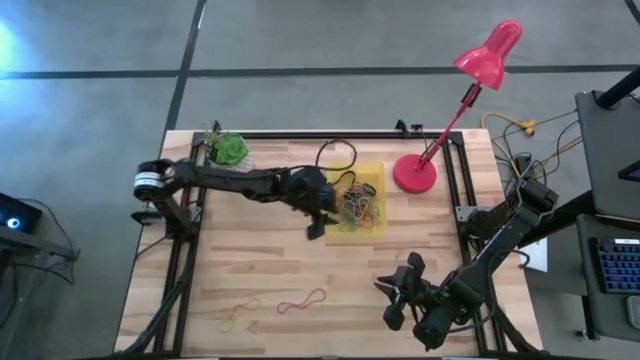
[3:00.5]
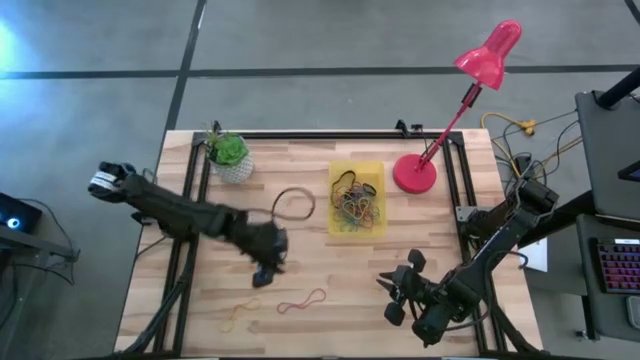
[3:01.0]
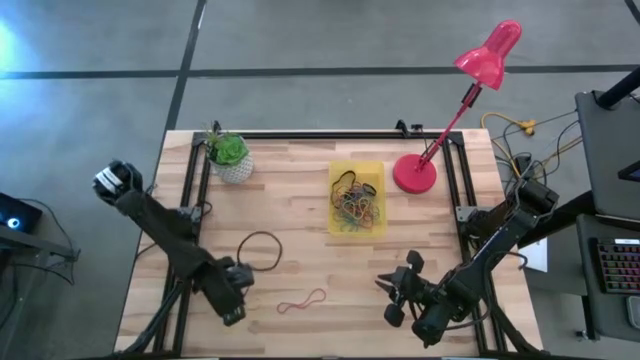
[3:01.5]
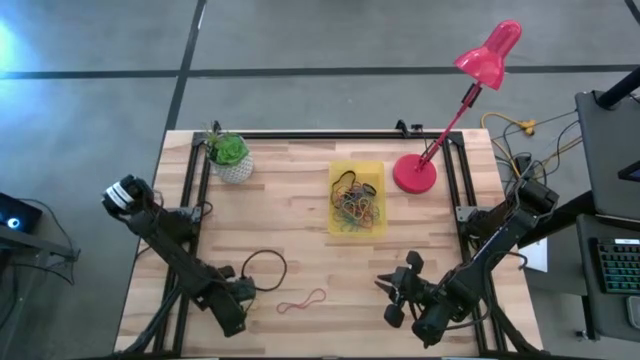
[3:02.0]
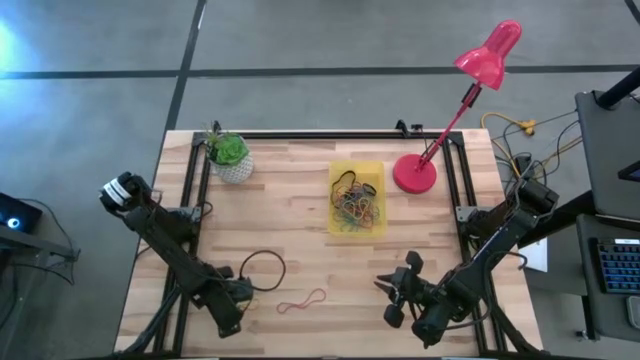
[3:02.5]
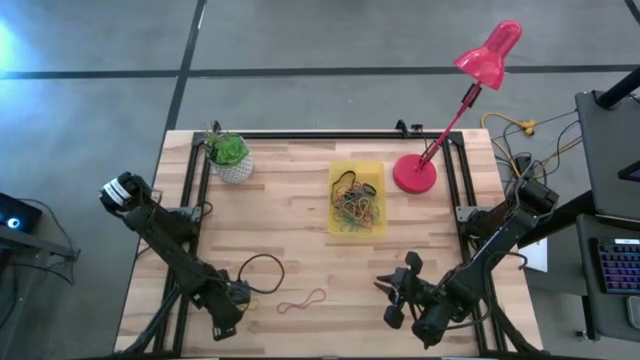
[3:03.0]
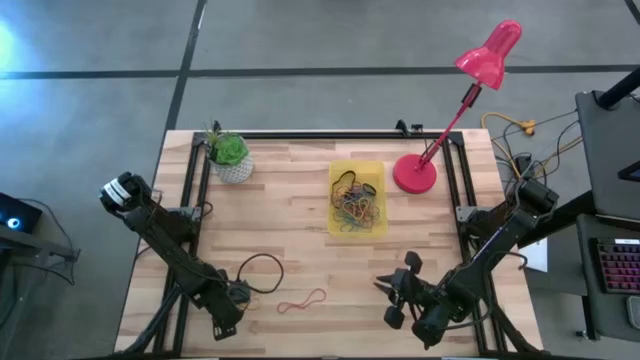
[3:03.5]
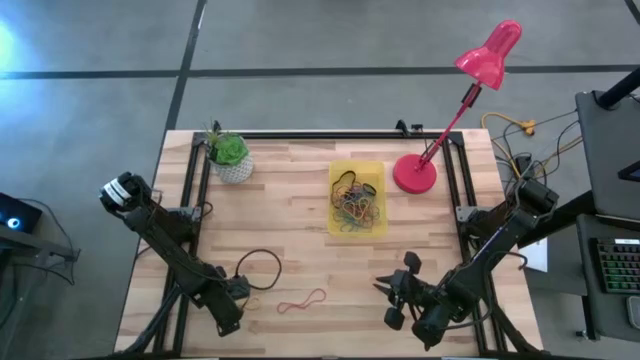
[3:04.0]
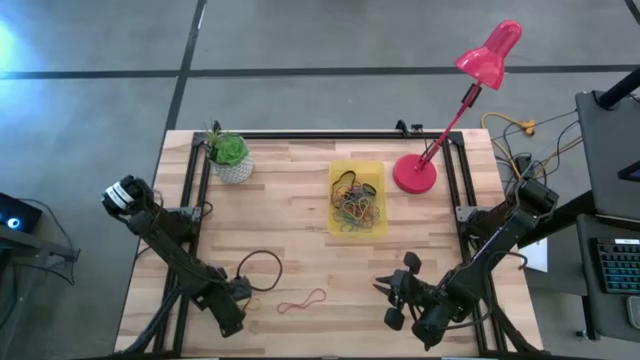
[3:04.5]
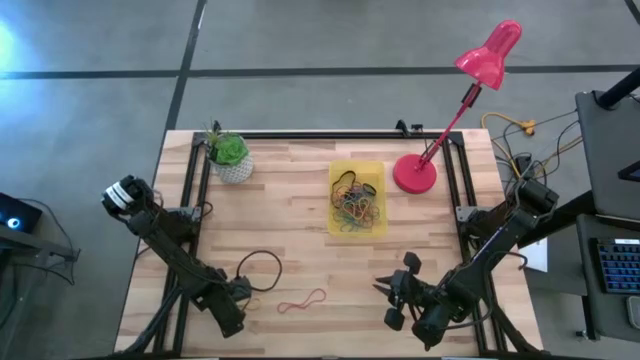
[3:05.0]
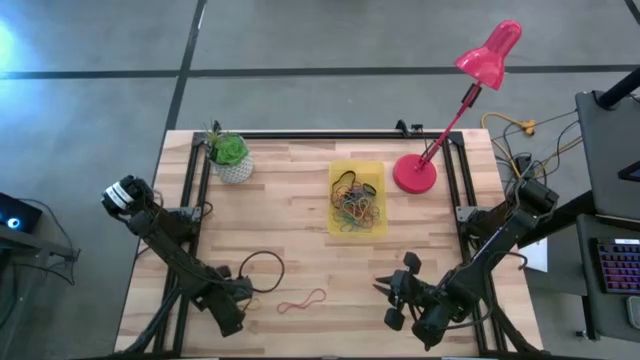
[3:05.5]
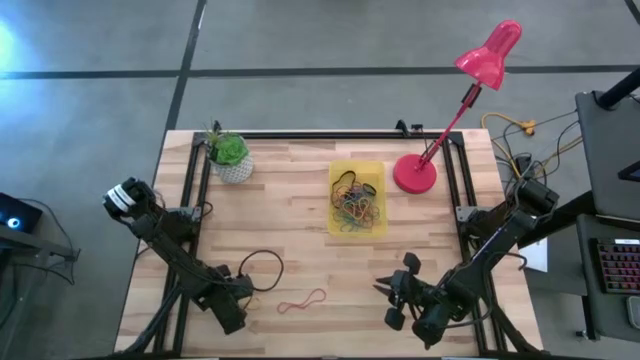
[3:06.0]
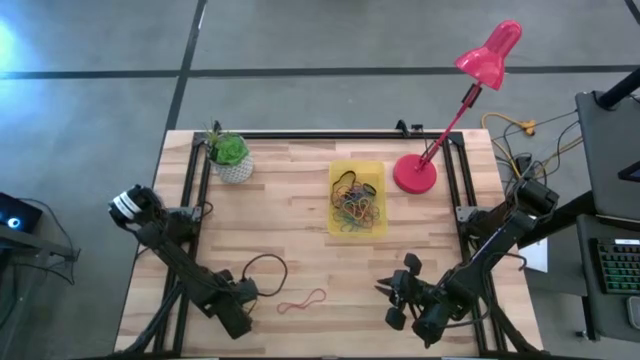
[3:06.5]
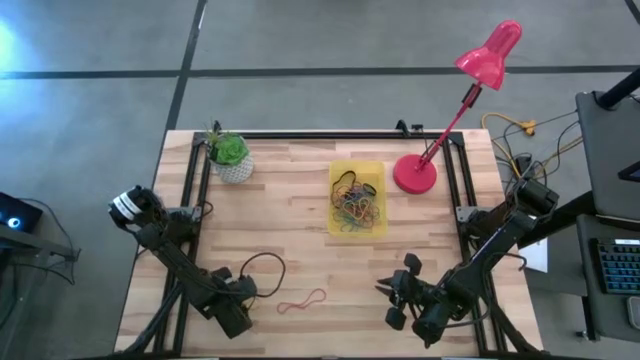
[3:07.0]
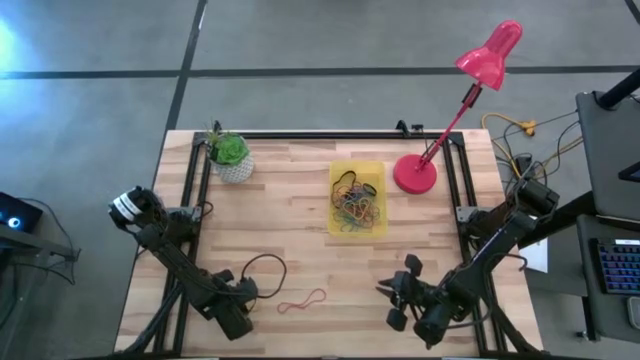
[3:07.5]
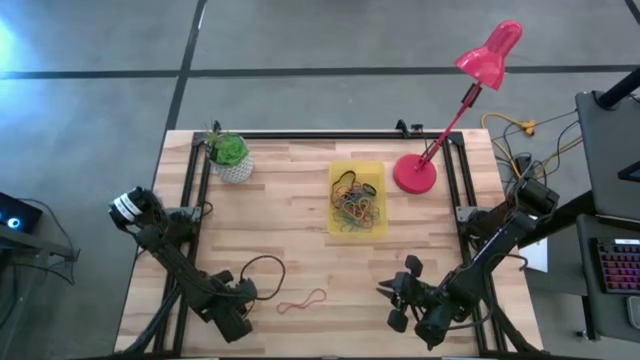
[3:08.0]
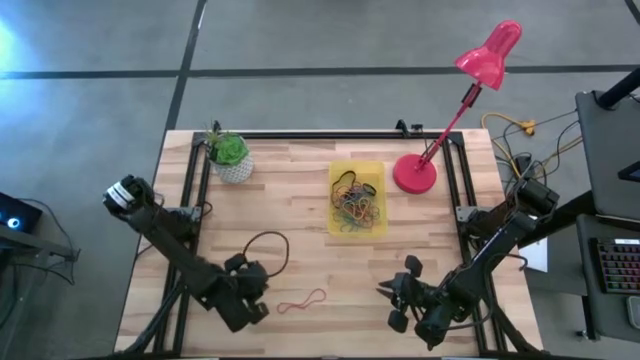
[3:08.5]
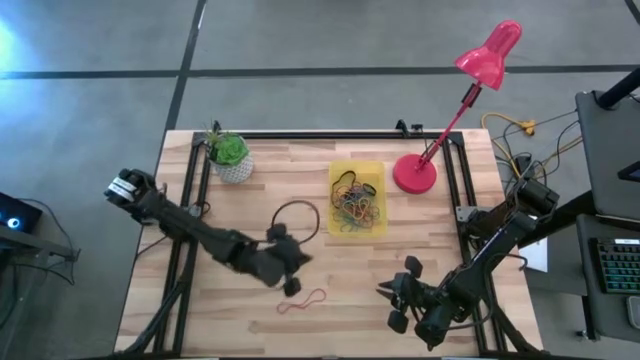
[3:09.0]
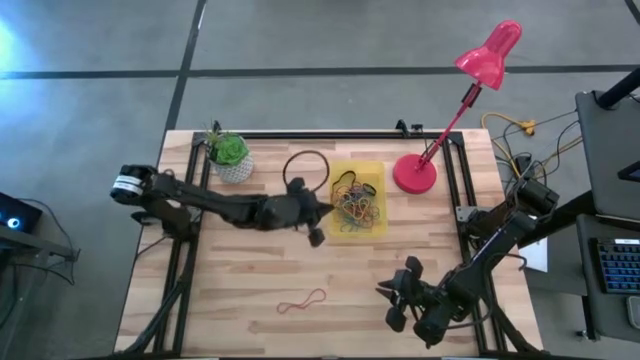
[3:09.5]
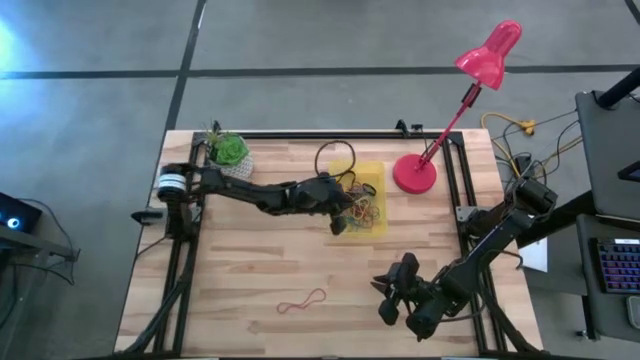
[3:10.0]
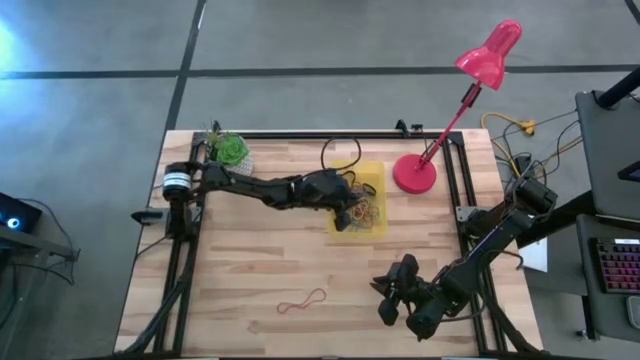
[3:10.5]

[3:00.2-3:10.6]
Task: Pick and place rubber bands into bin
Put the yellow rubber band into the bin

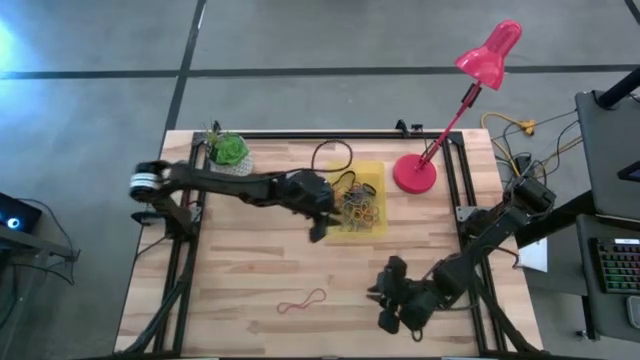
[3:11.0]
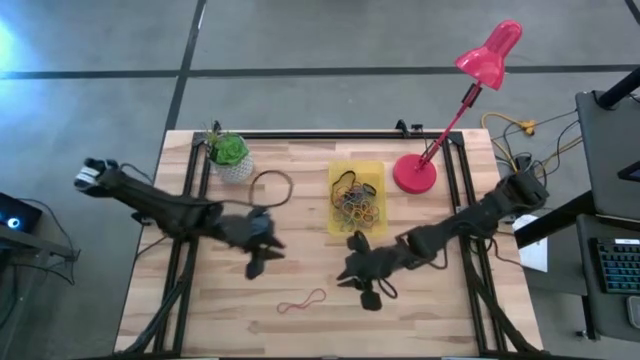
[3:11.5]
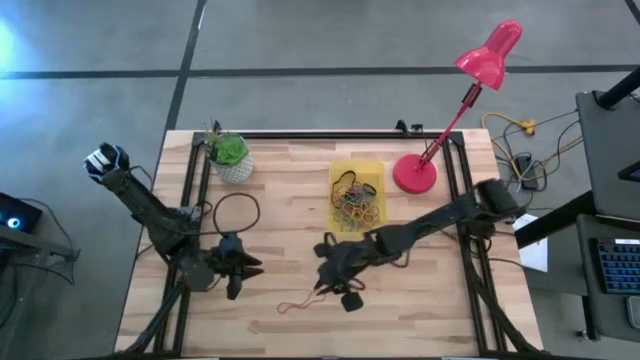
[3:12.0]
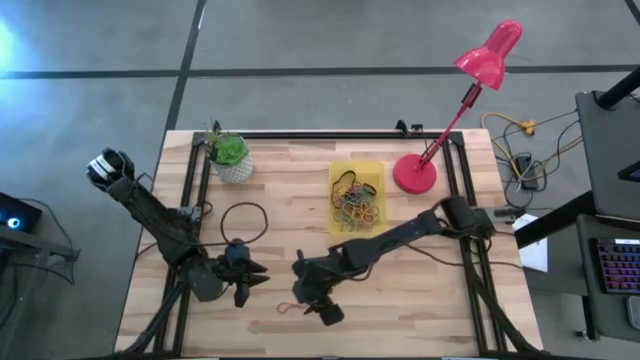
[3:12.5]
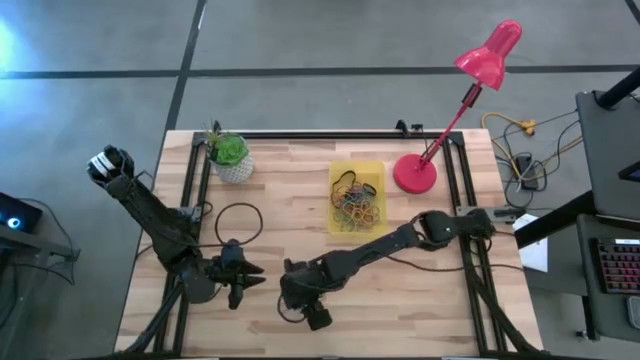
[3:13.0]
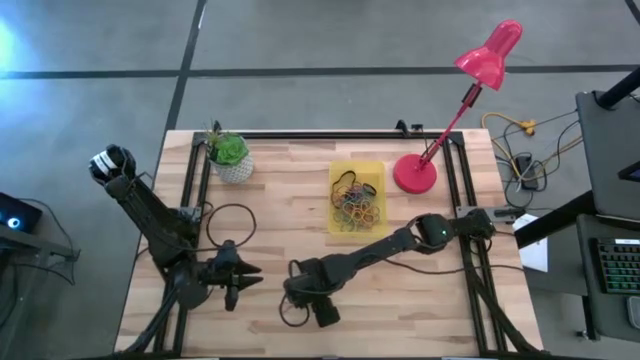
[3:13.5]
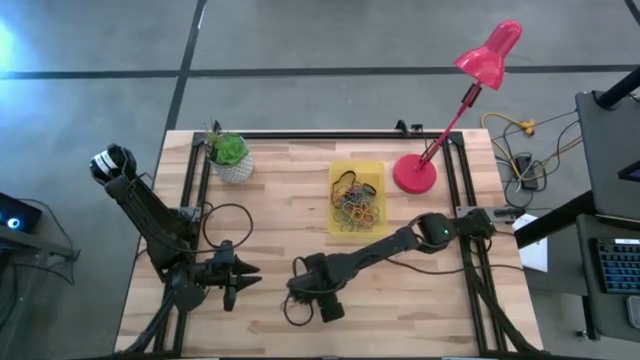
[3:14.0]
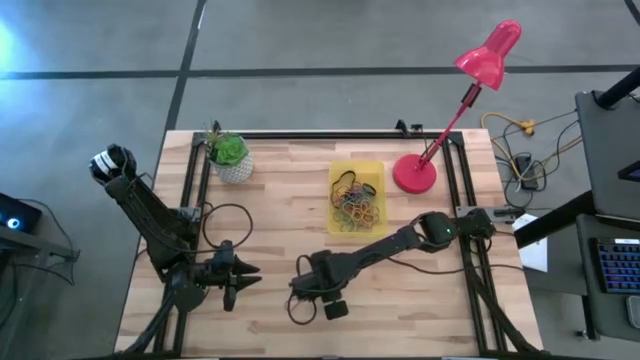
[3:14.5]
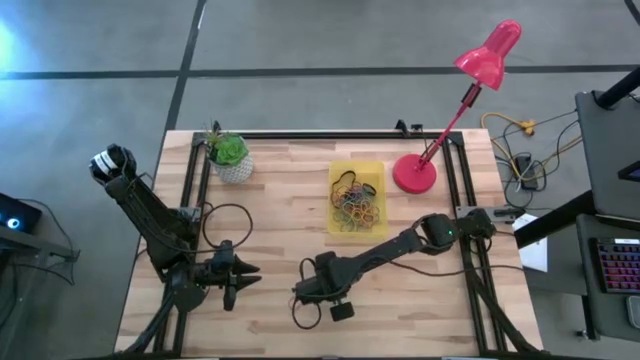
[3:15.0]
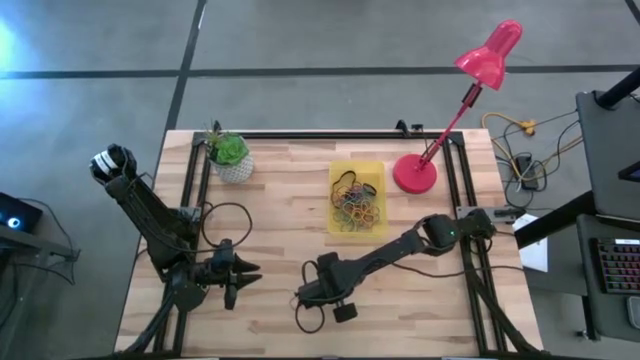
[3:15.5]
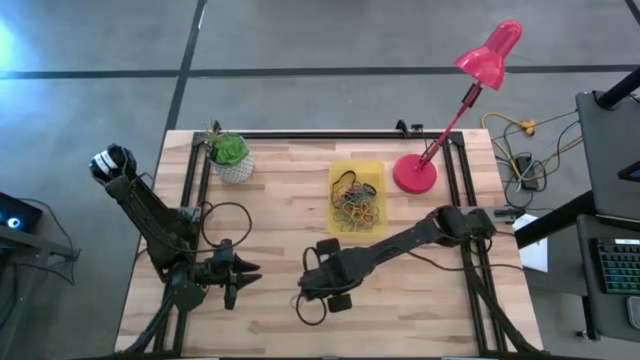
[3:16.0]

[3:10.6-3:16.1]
Put the red rubber band into the bin

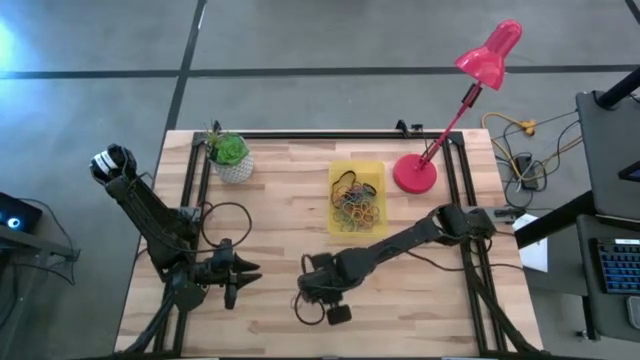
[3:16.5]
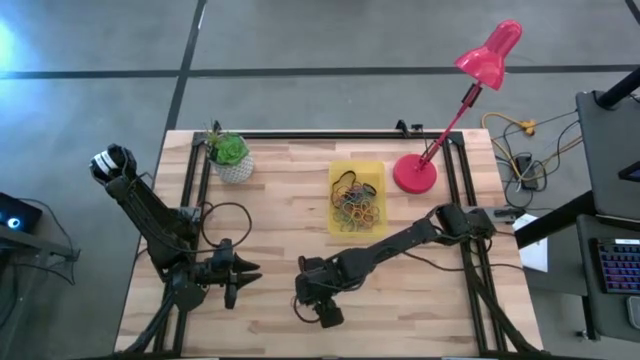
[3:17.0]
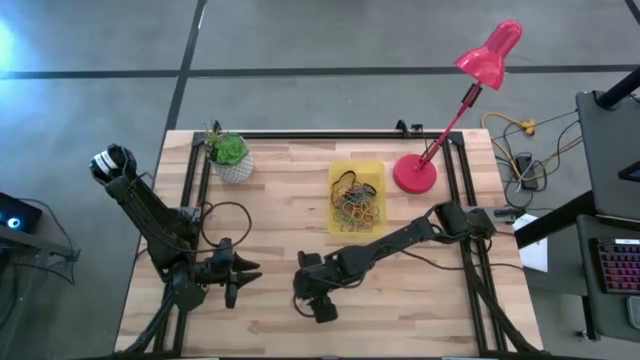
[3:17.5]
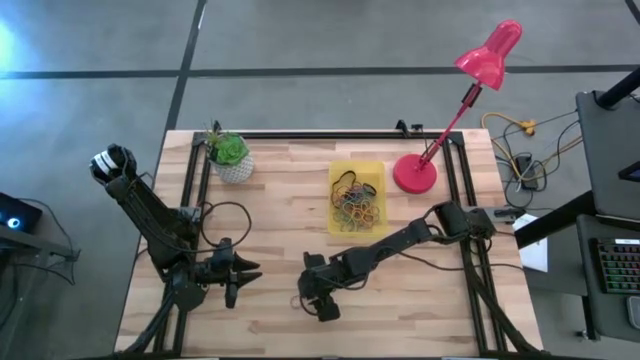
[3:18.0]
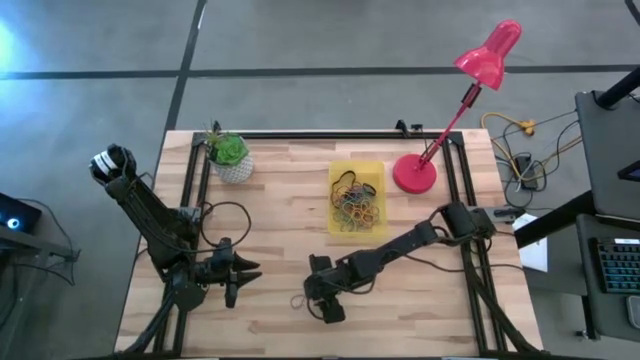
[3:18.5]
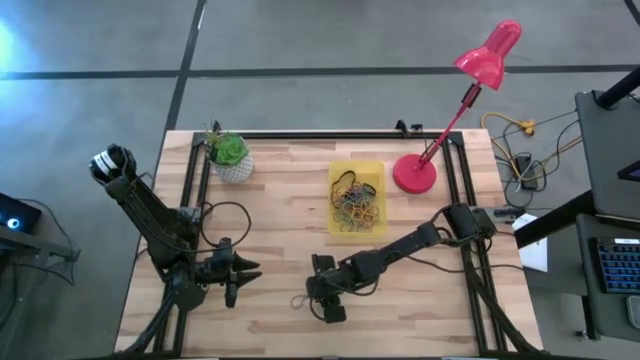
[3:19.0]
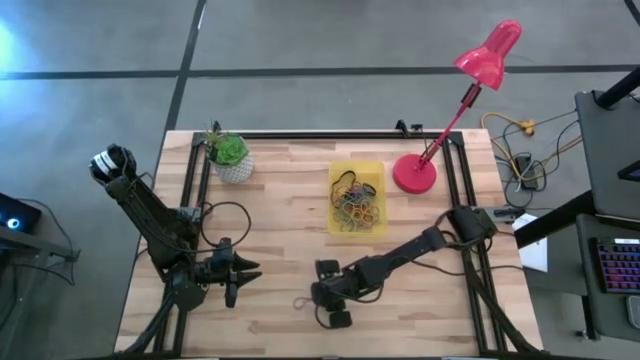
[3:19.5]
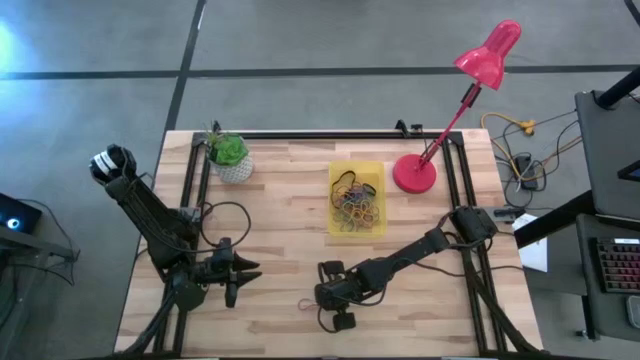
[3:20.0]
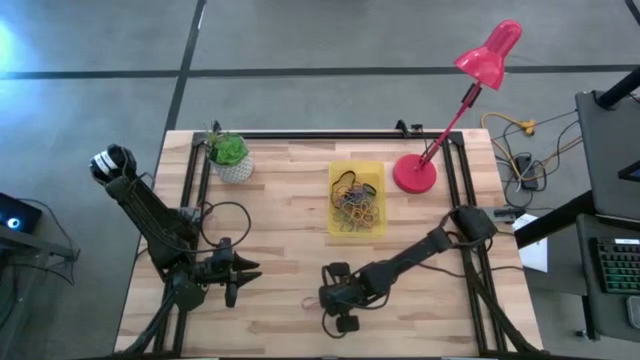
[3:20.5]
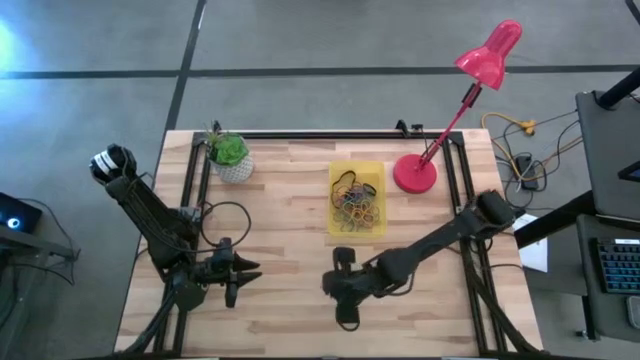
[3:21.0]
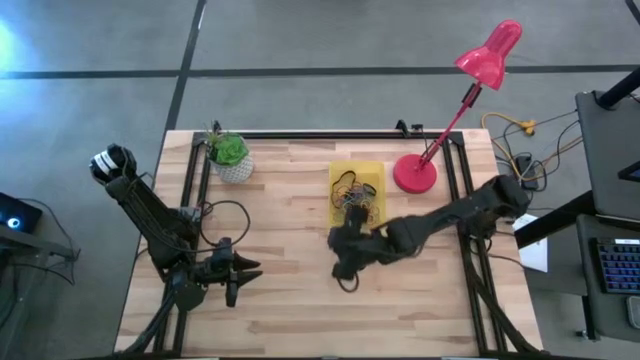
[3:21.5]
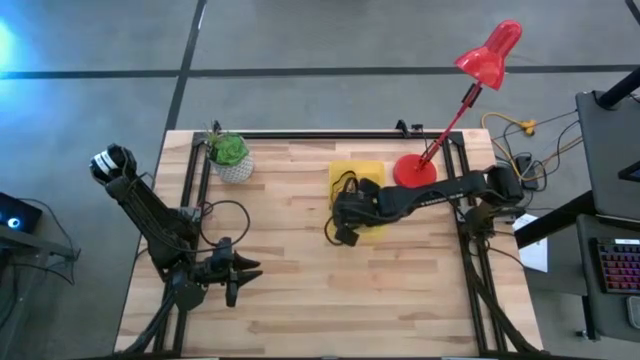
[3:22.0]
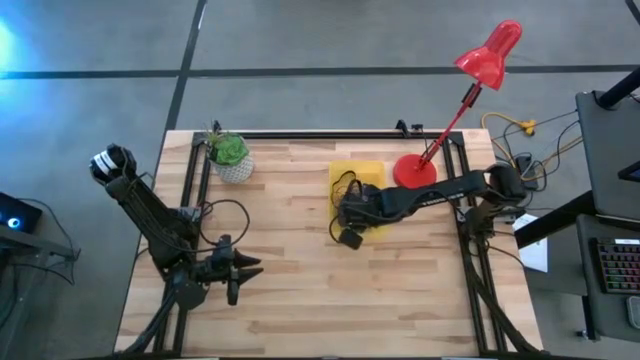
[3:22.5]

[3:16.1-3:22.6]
Put the red rubber band into the bin
